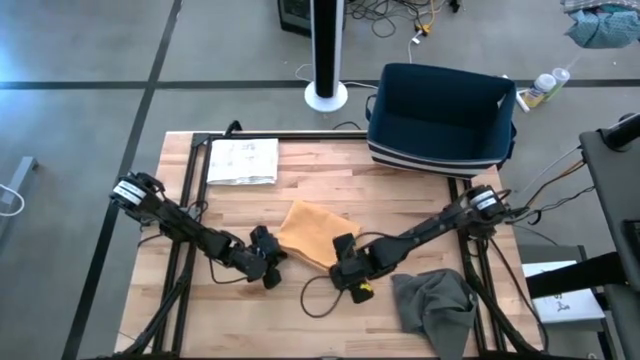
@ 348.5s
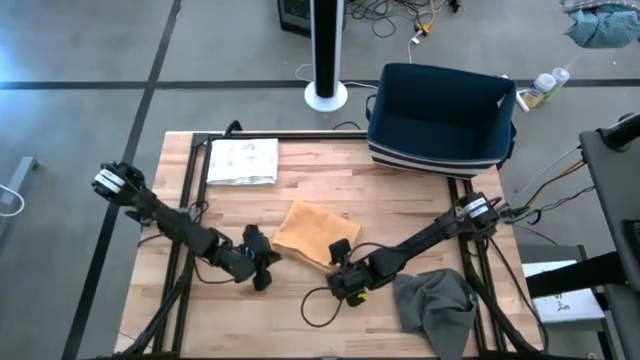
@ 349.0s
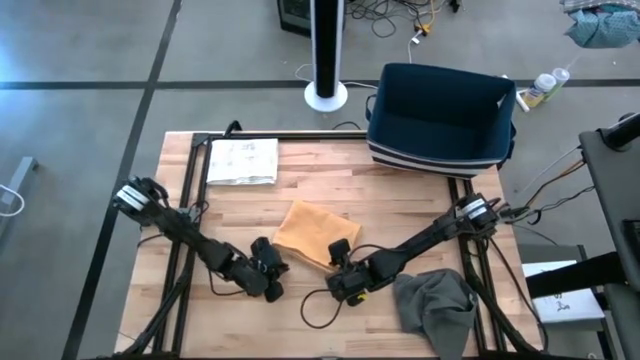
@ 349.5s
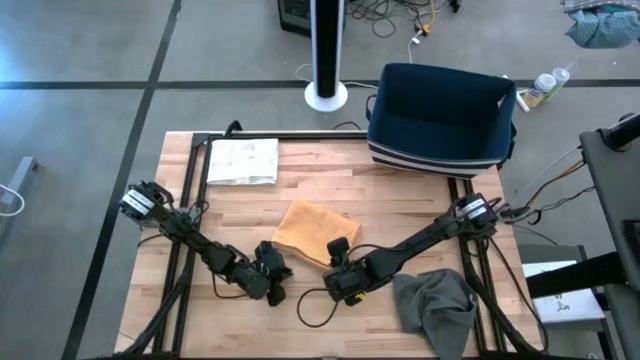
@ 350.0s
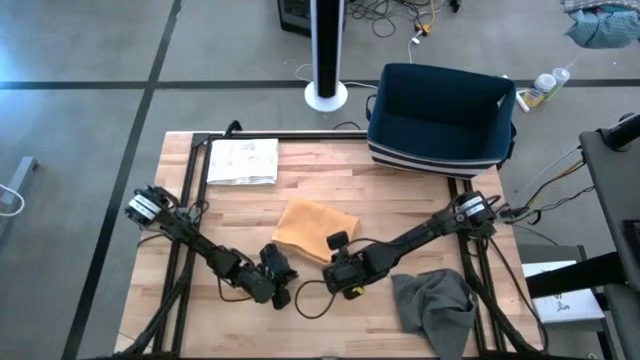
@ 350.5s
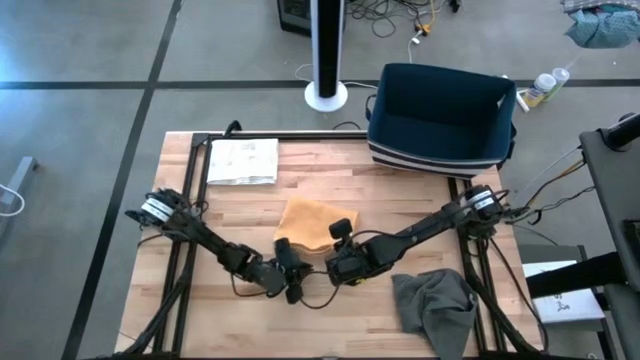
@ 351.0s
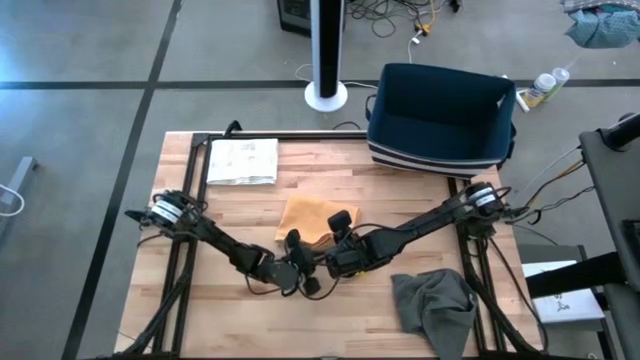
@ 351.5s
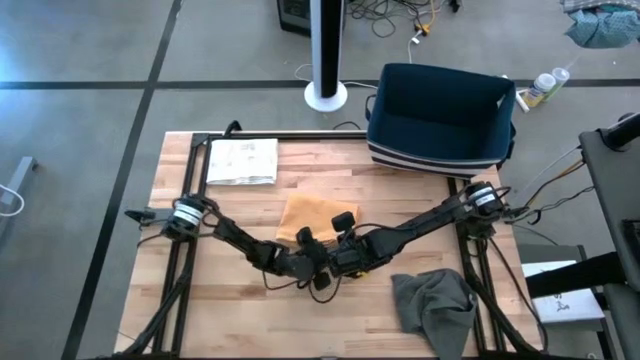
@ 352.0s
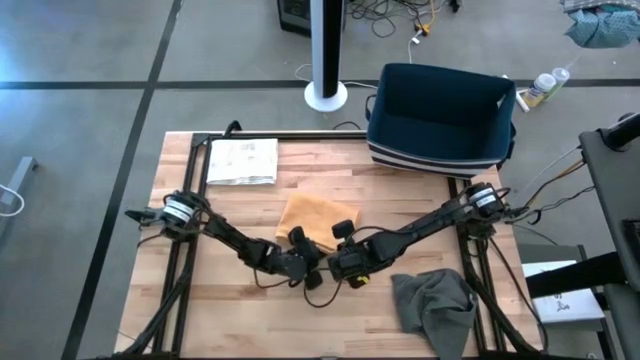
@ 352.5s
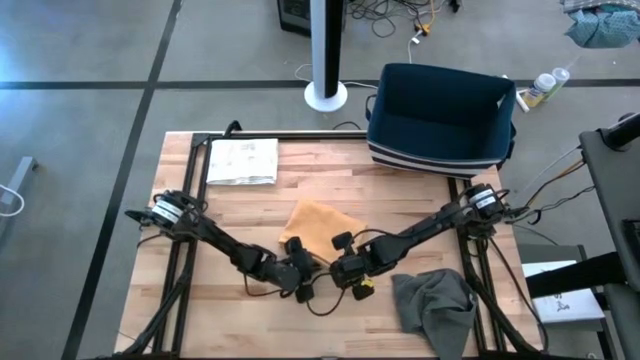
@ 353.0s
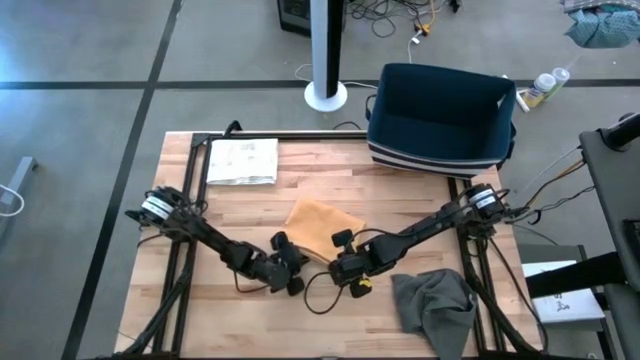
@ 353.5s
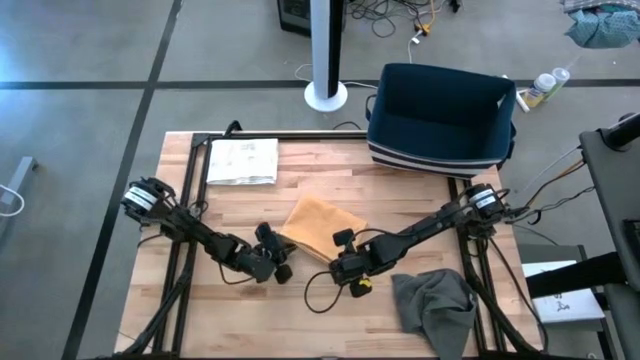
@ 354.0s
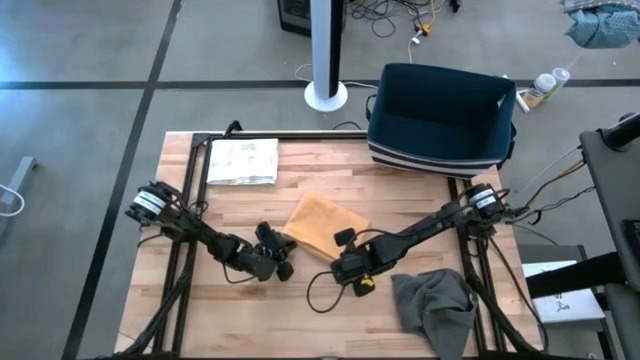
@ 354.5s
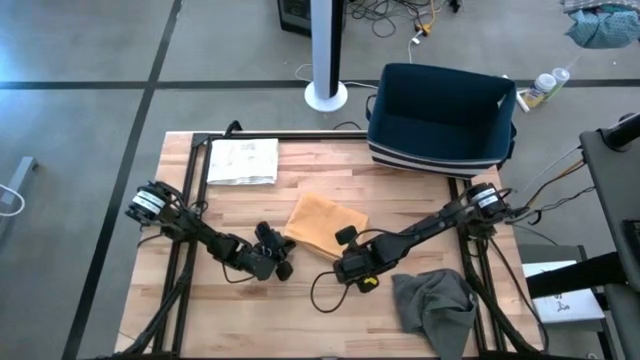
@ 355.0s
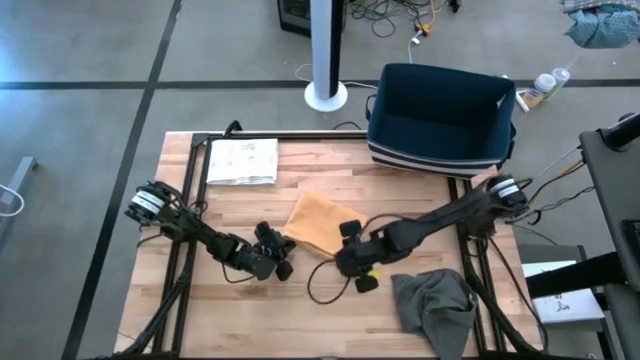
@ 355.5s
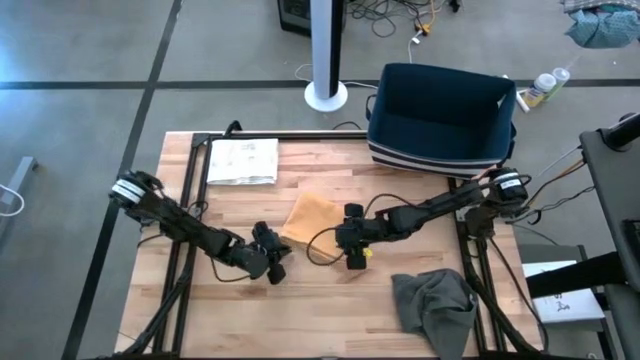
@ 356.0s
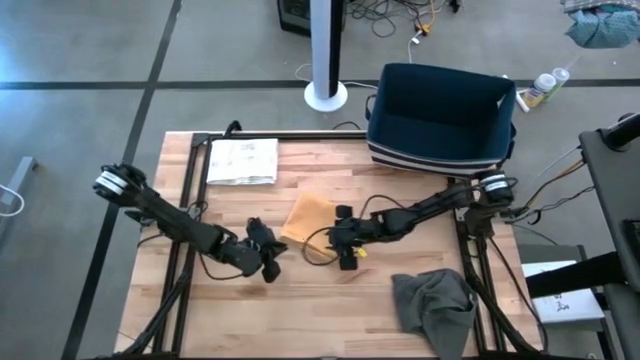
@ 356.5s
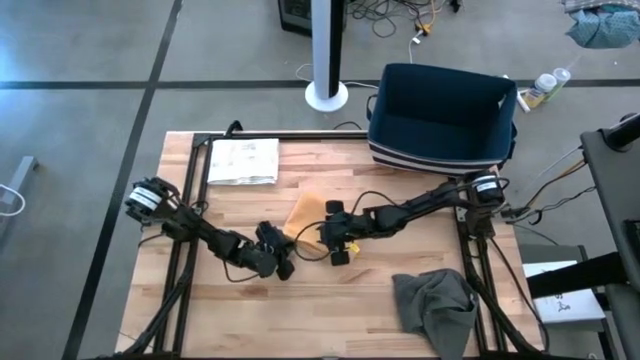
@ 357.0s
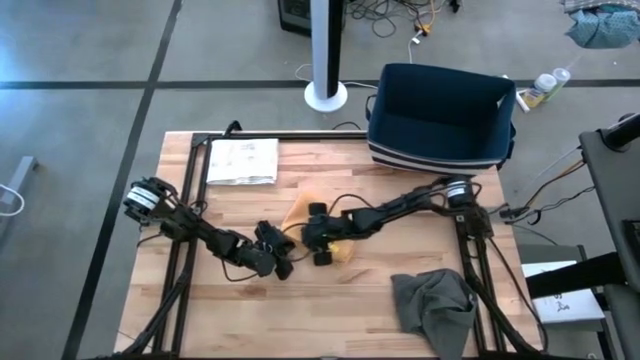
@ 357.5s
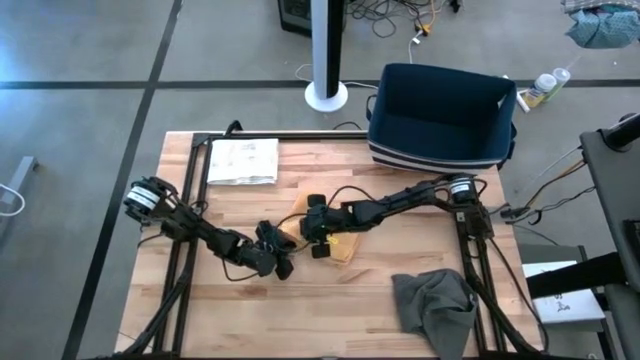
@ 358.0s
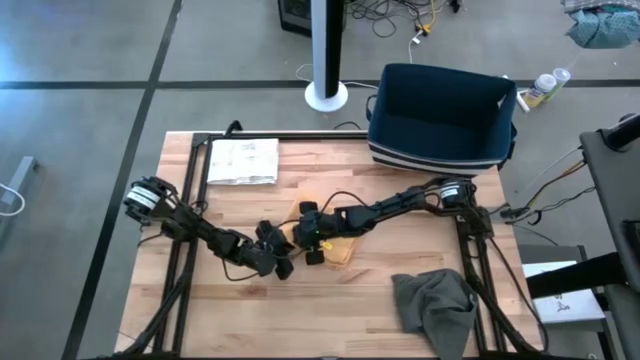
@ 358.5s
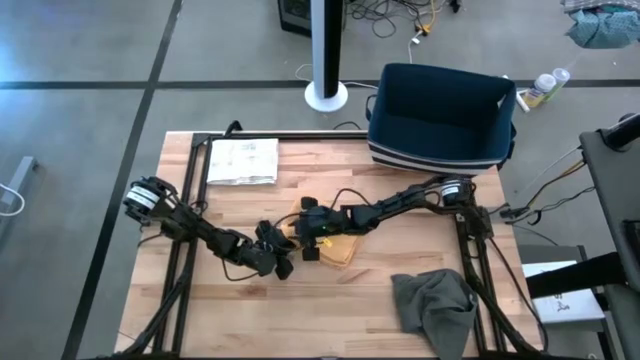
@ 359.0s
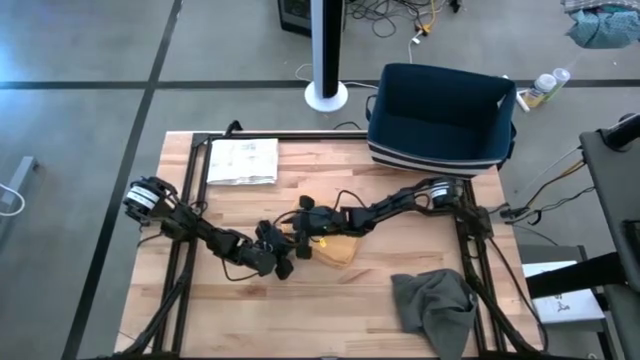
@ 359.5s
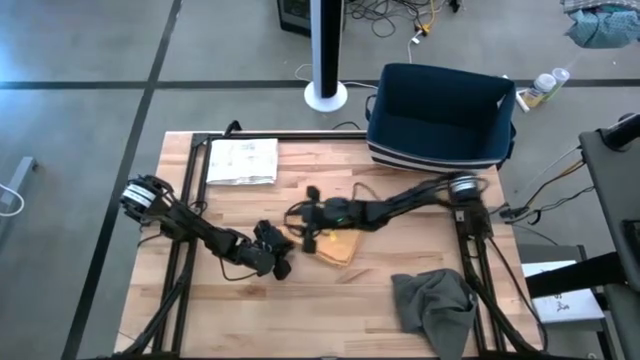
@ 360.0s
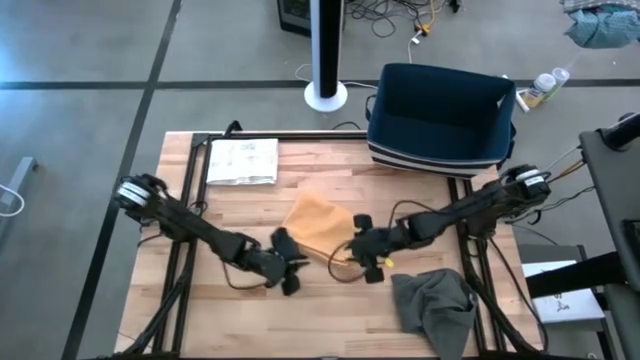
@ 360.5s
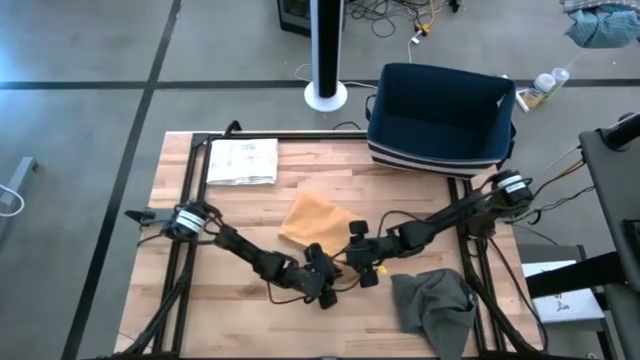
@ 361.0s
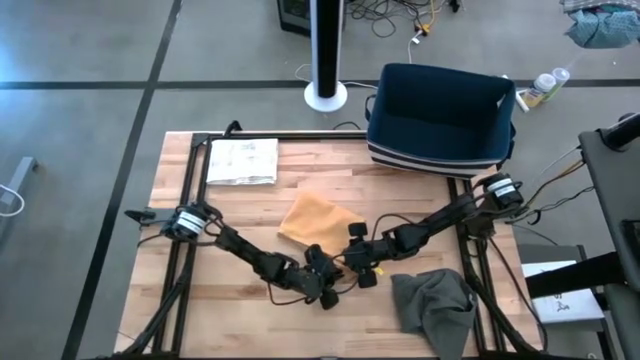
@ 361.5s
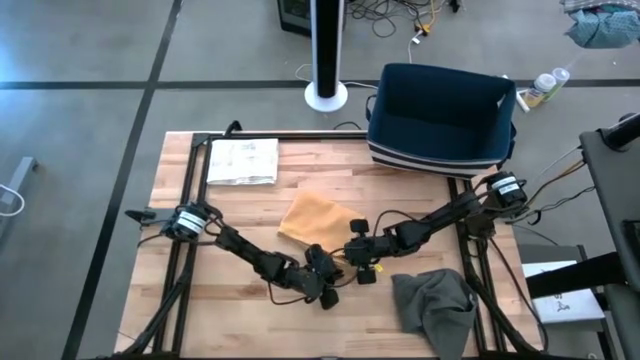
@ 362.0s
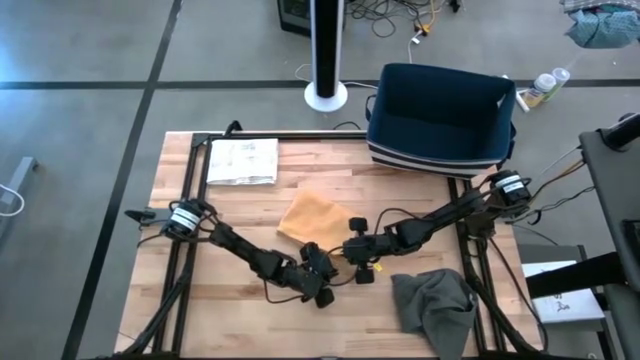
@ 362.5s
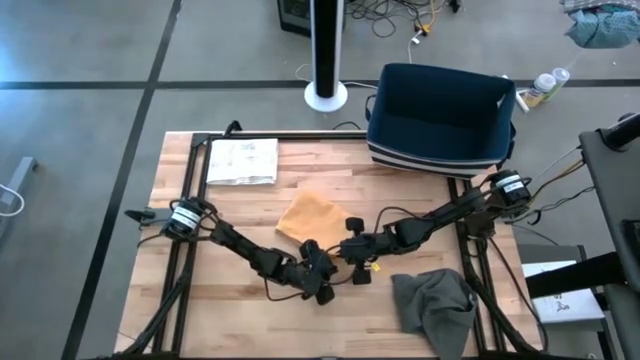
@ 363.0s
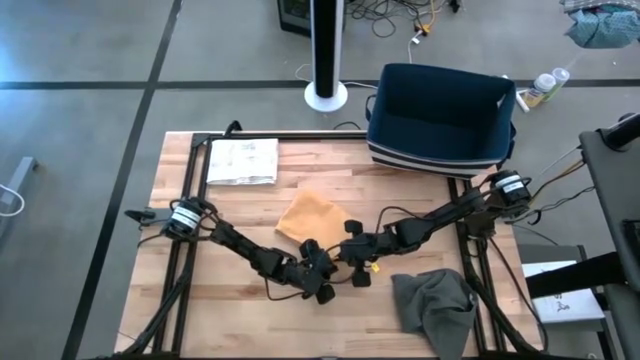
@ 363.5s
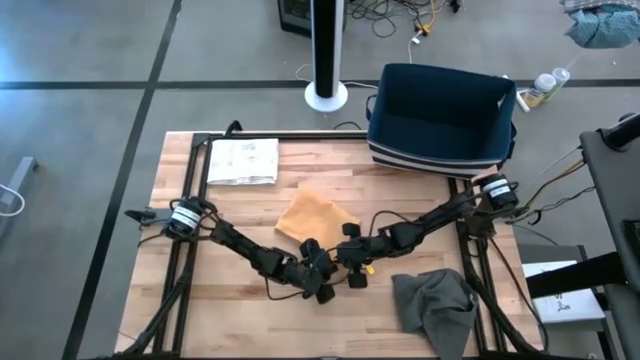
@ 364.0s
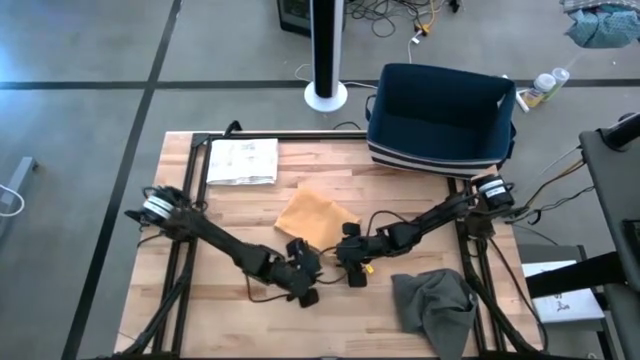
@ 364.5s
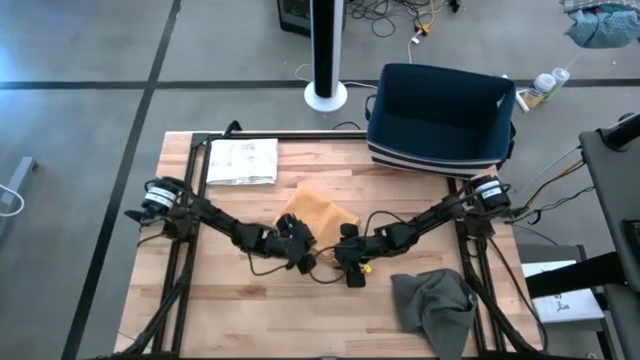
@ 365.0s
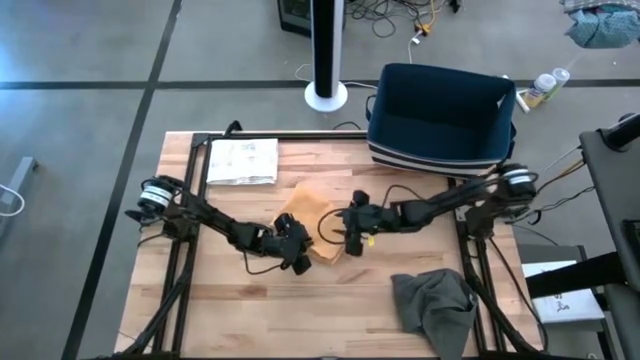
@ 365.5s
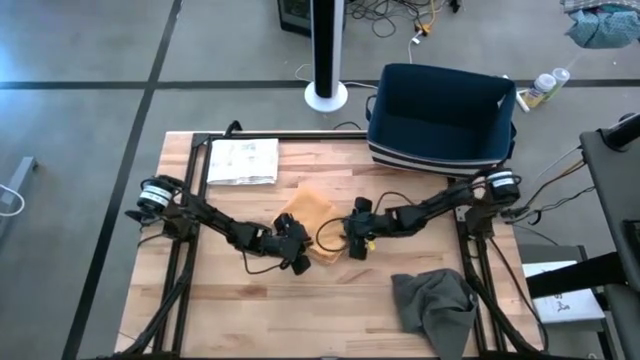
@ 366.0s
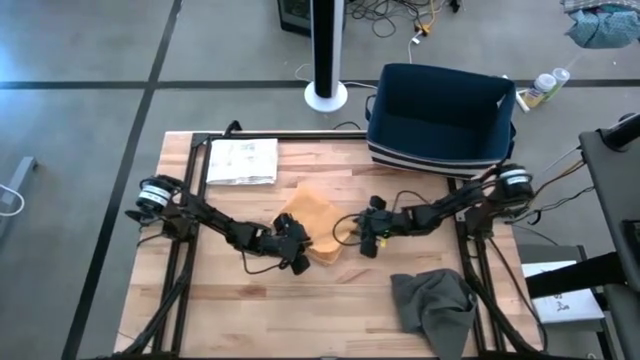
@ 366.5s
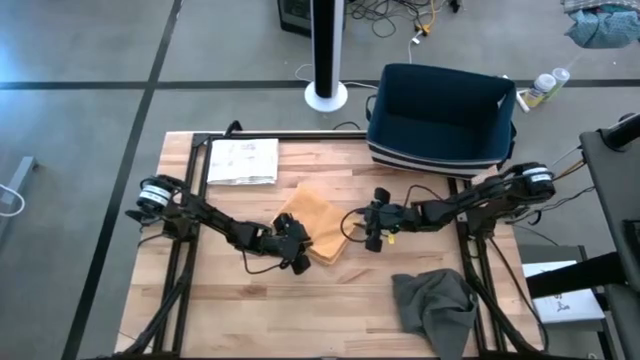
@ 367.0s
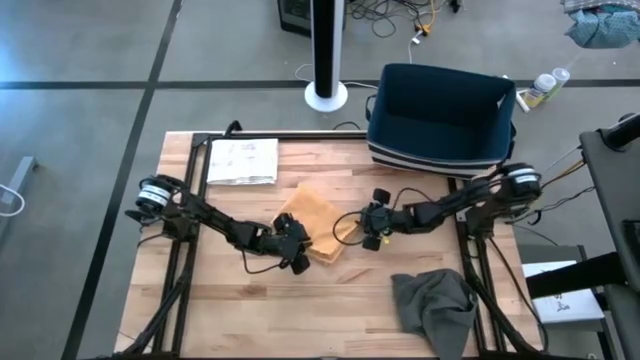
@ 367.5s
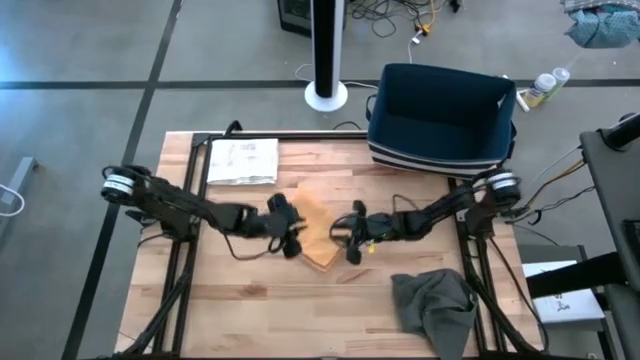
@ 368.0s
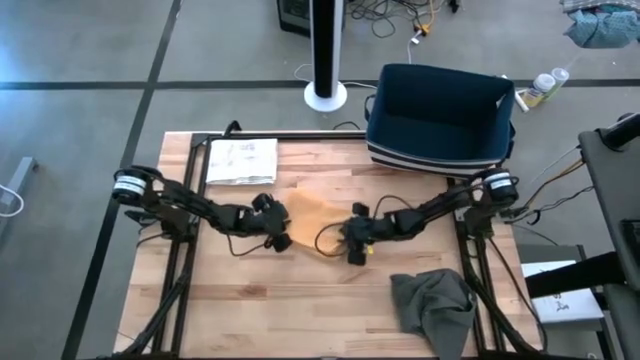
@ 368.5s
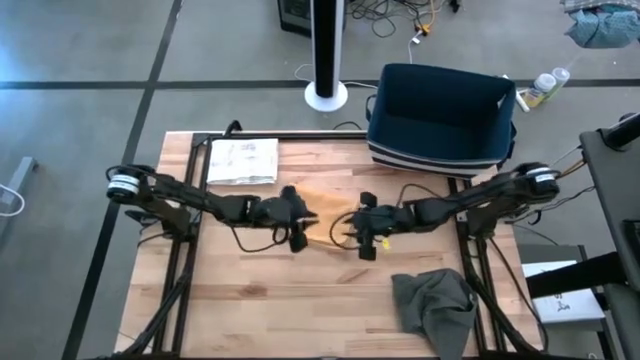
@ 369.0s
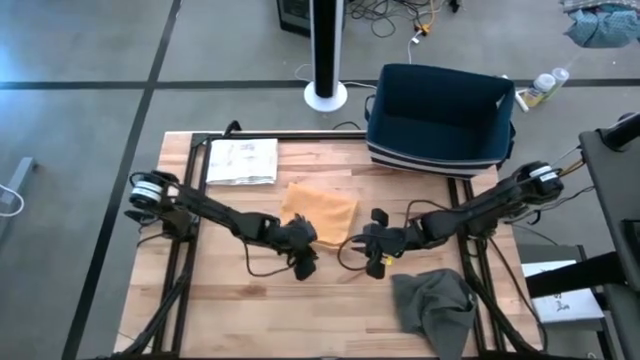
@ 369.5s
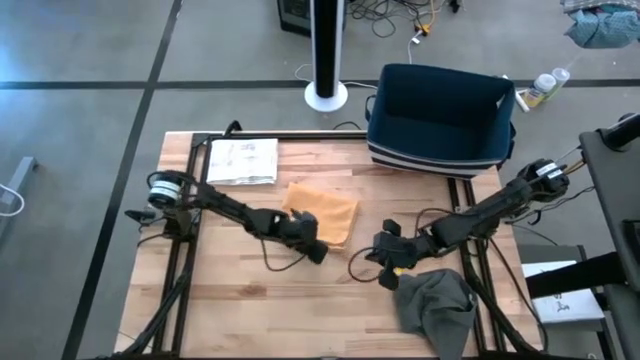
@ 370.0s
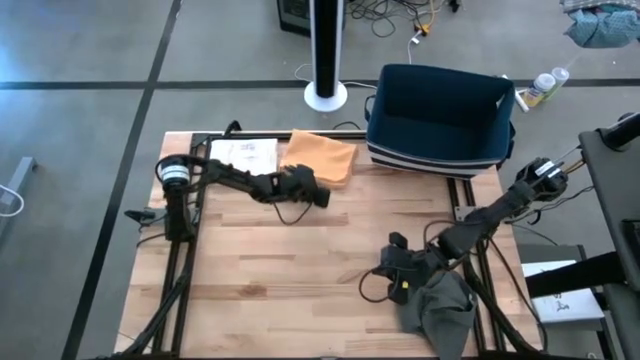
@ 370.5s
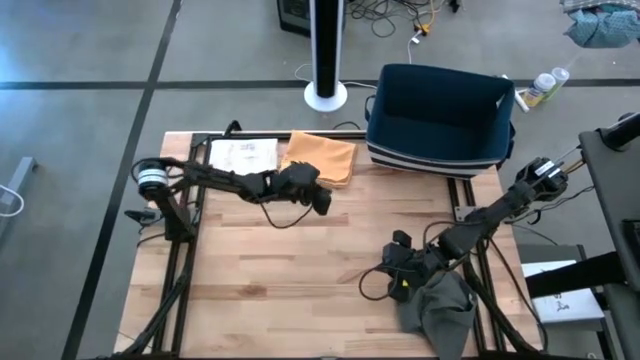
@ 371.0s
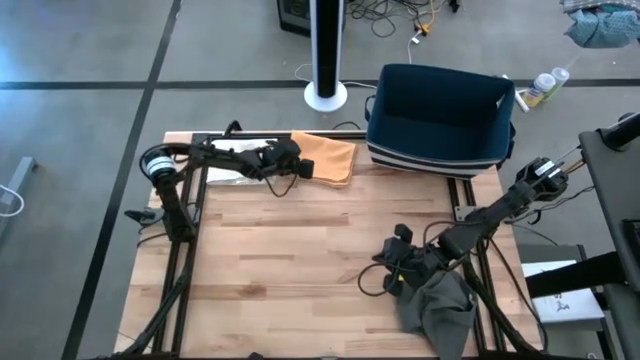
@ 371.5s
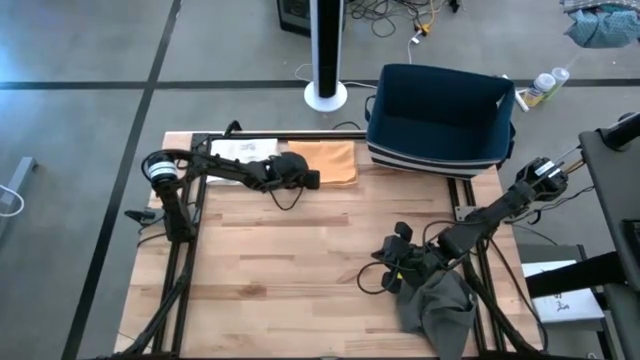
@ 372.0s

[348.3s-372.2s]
Task: Fold towel
Fold the yellow towel
